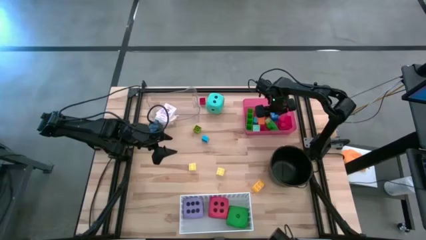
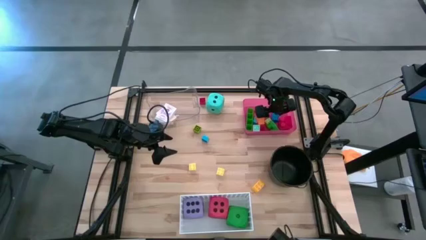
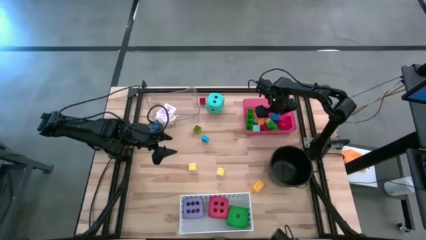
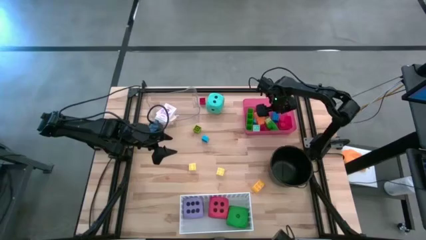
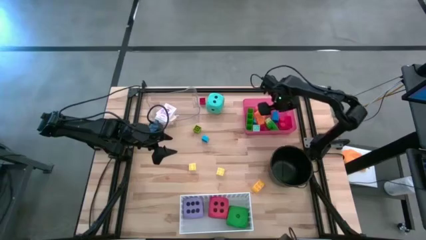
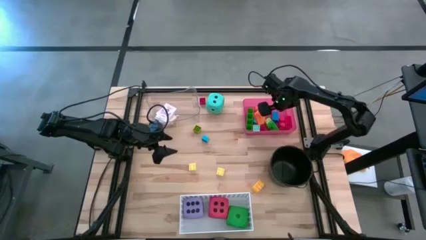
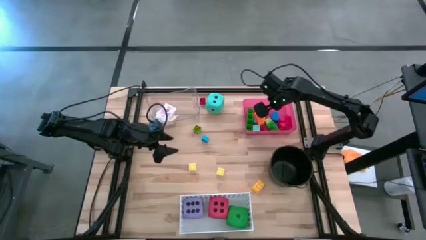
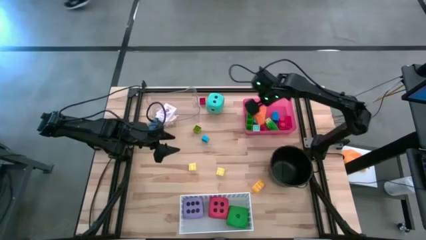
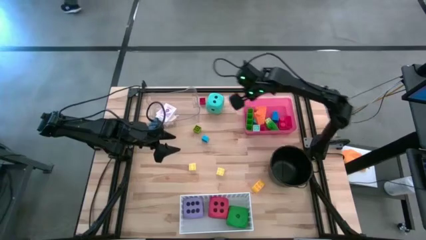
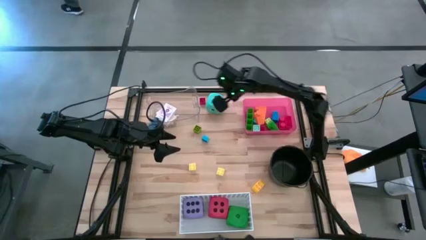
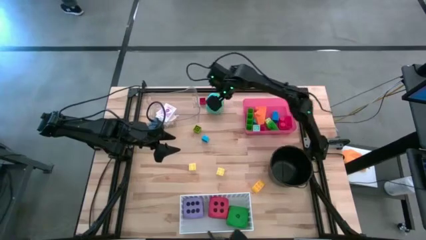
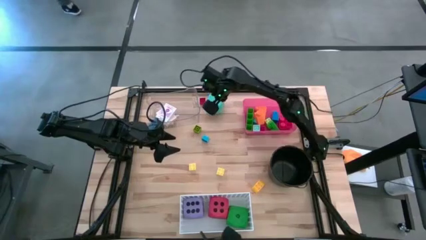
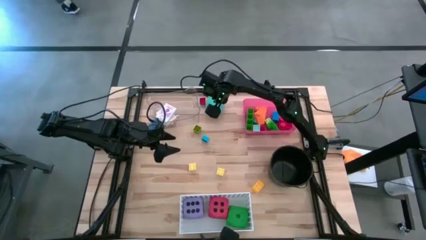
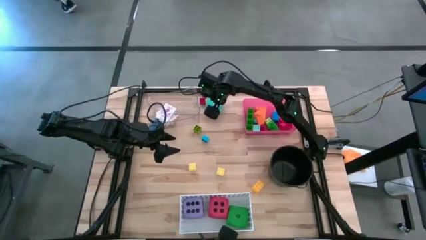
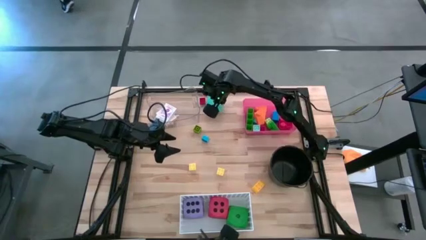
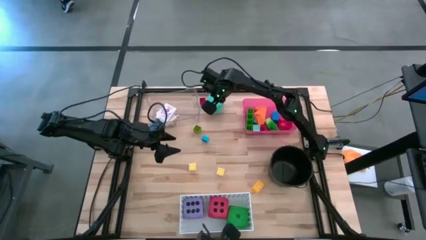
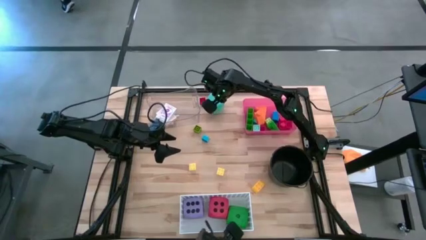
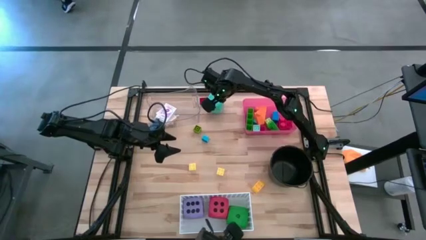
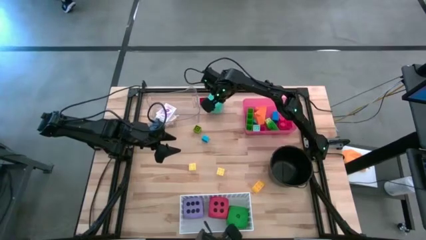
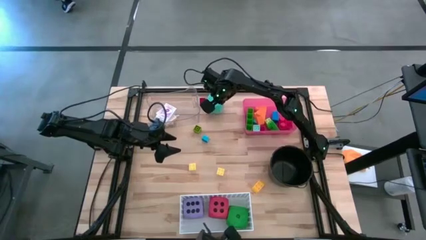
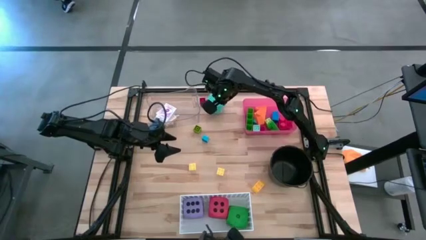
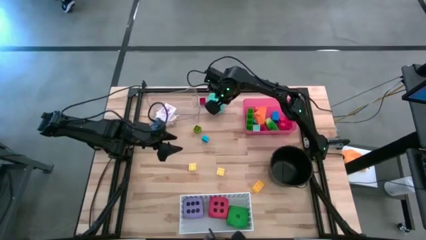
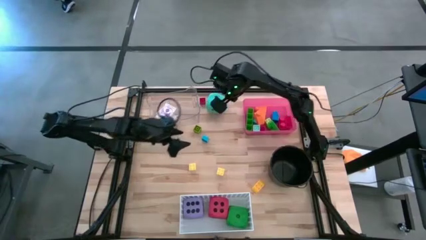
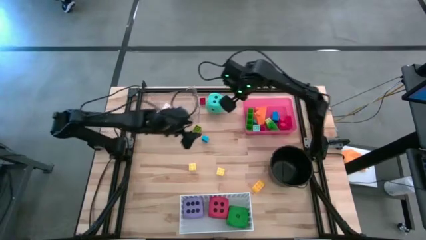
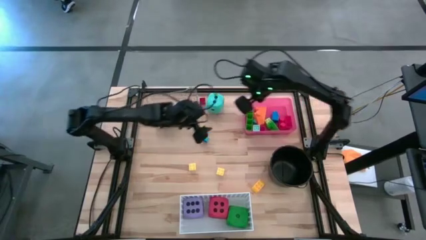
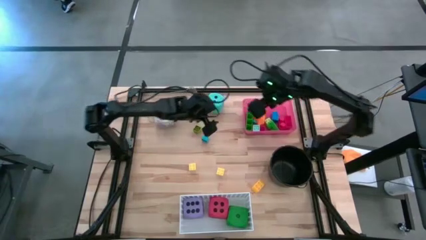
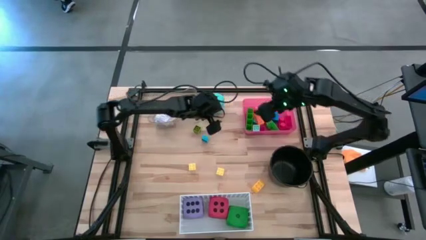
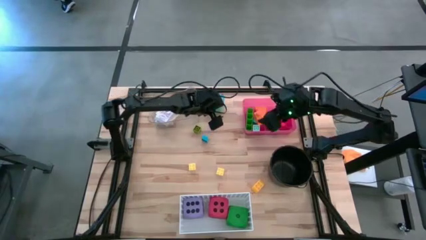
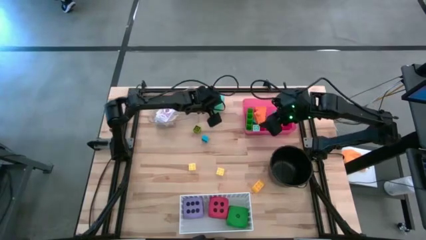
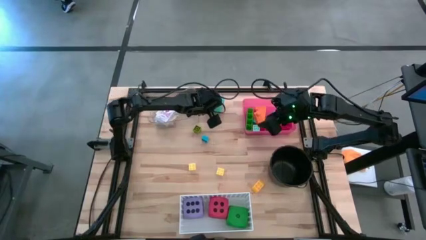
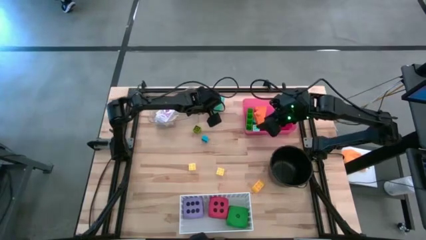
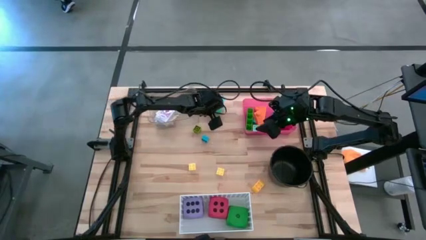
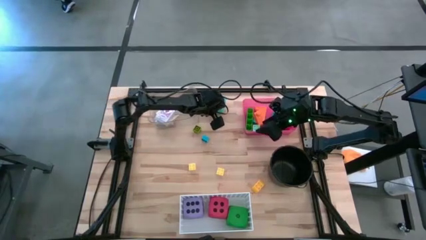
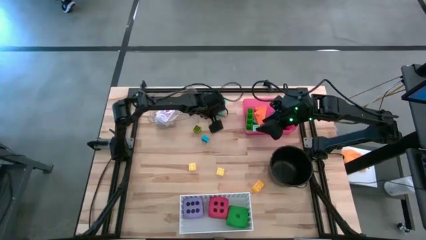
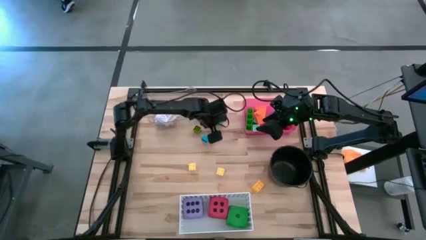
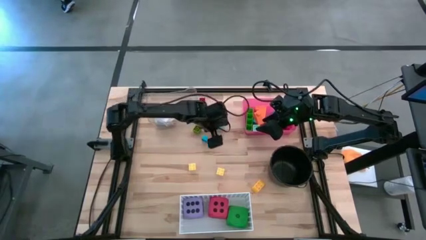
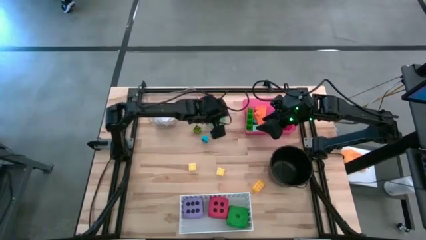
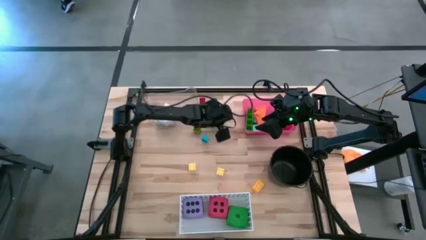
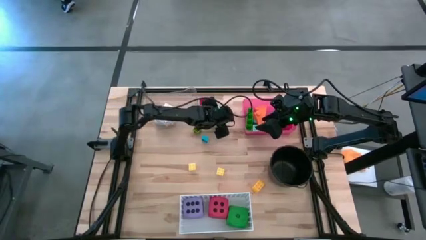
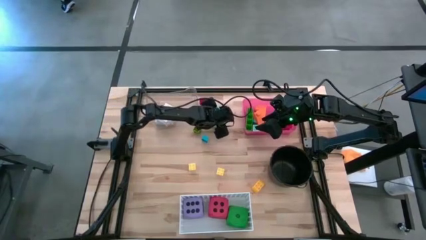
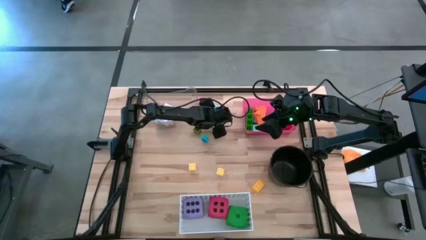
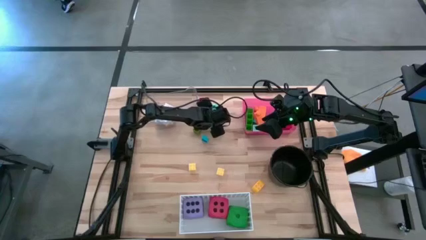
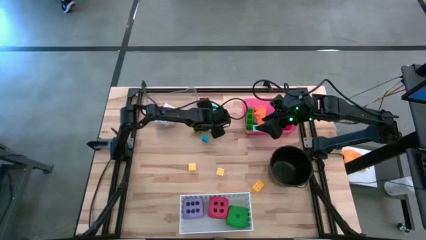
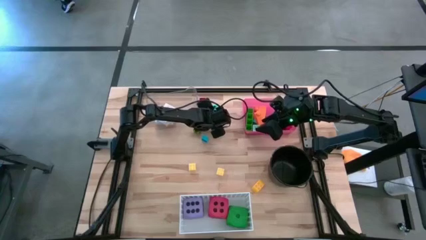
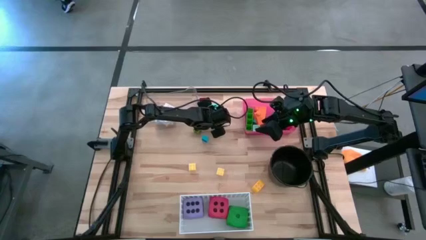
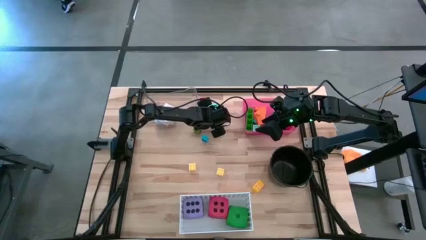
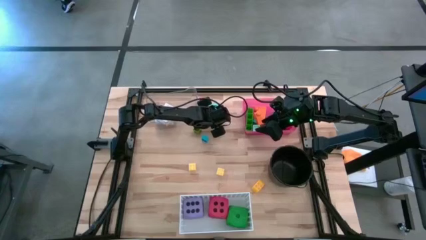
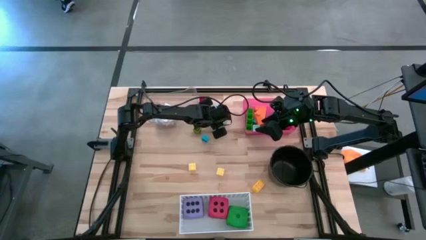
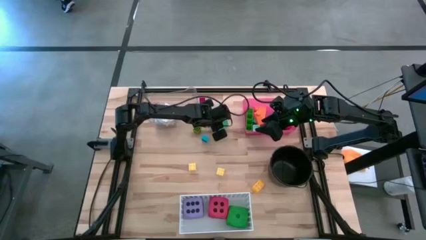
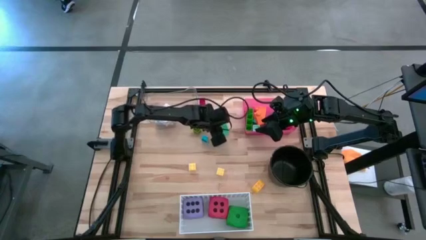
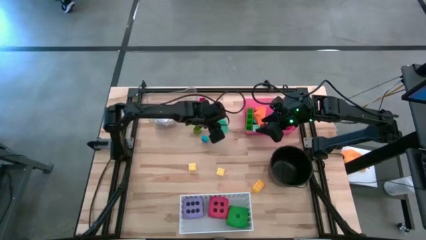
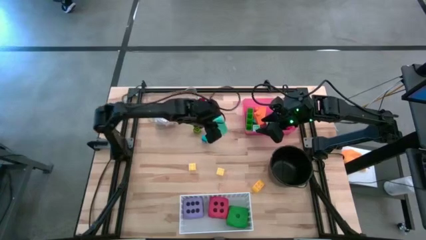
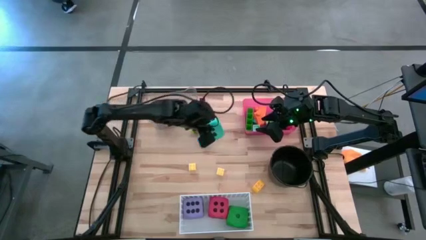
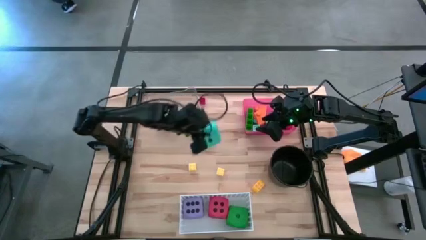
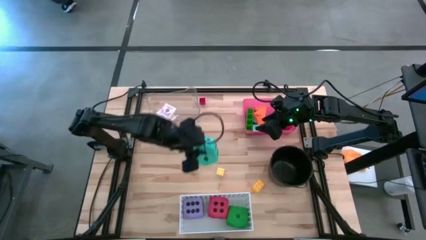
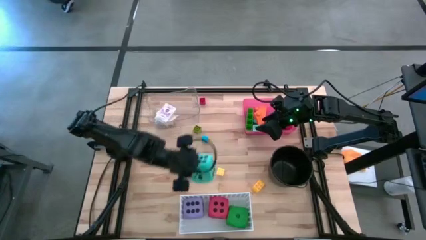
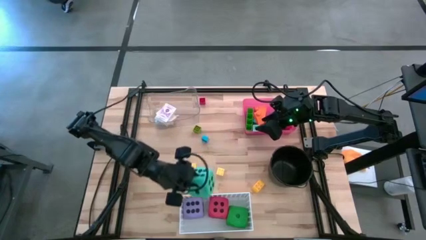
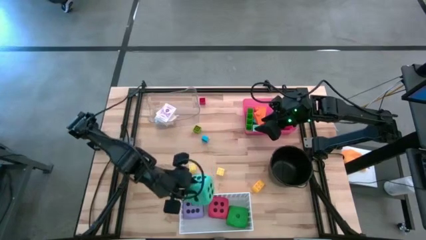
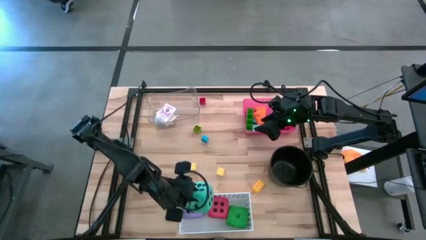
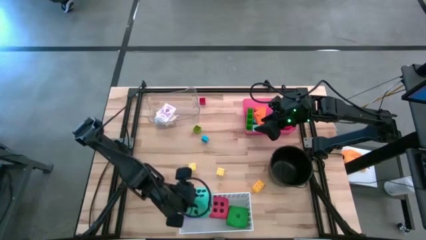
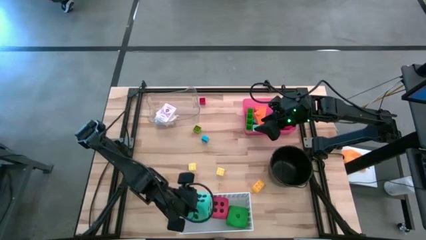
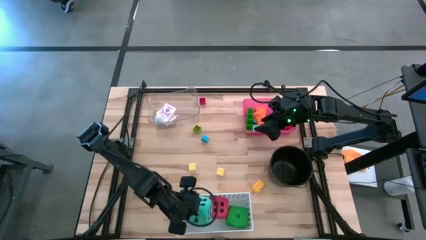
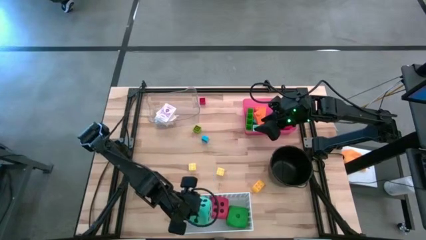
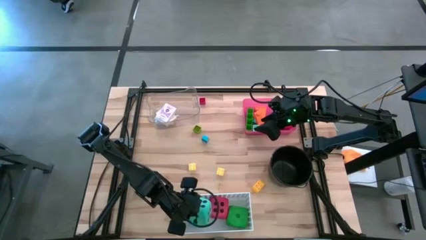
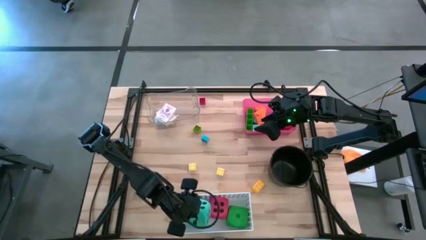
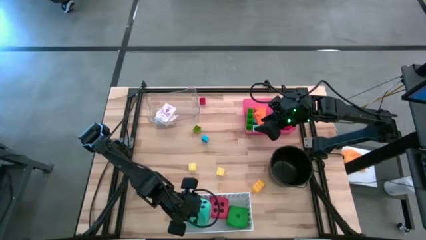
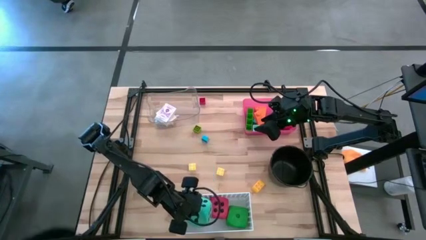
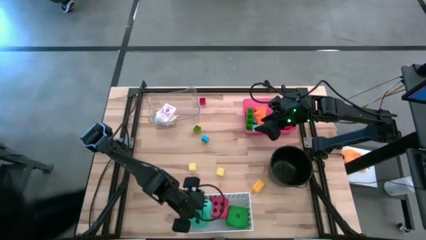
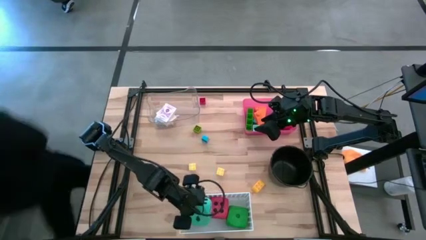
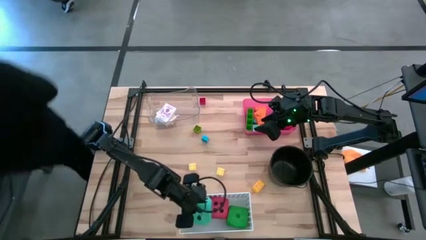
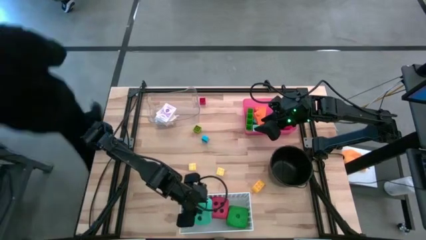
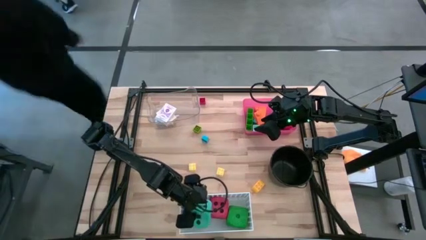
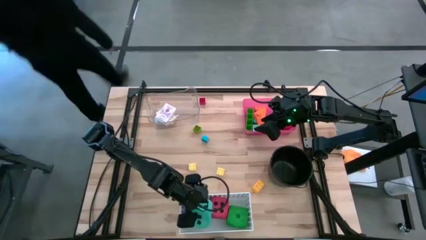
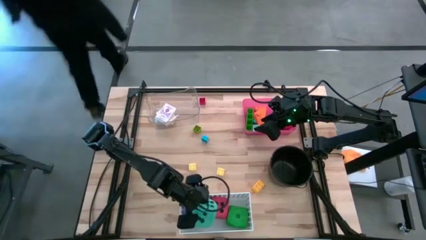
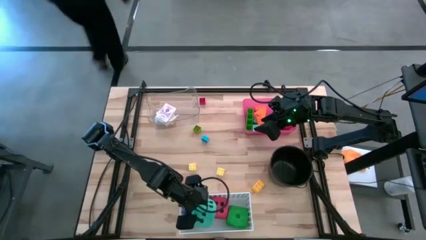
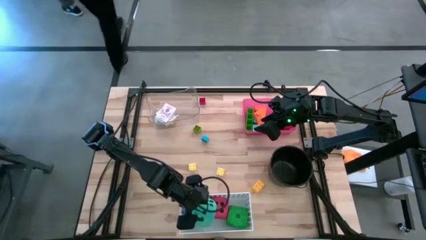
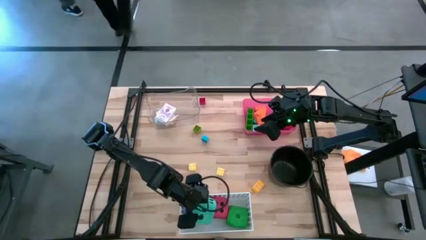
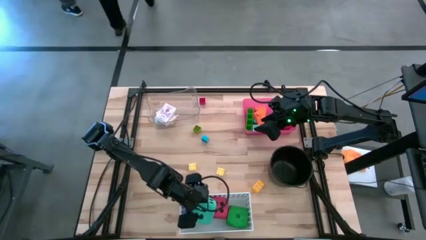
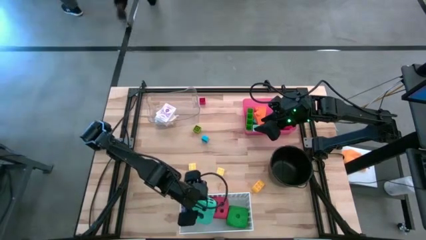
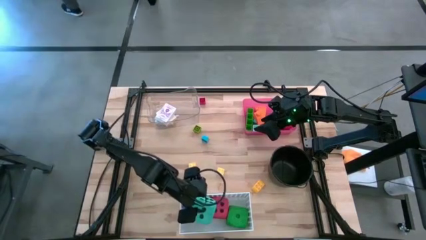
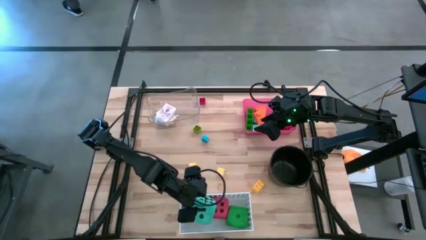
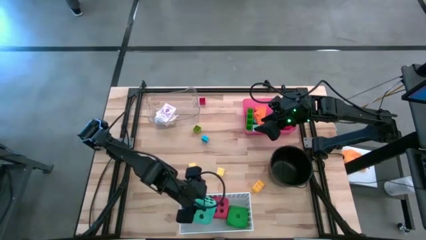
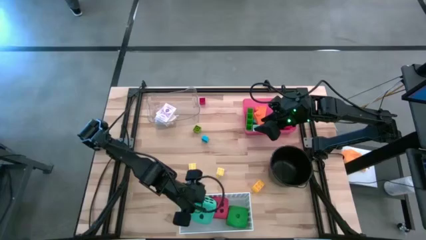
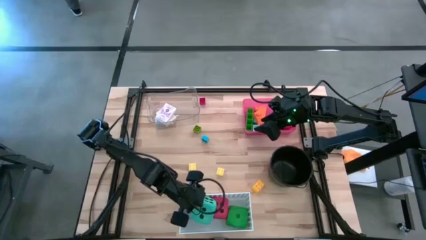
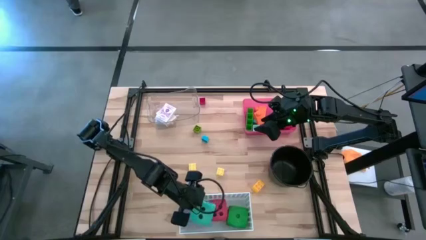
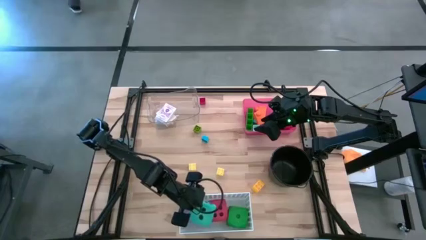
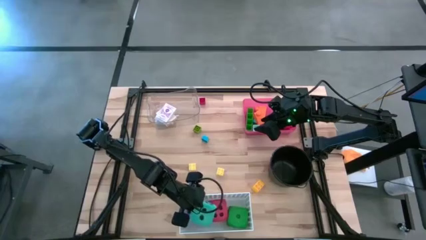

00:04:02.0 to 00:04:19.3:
Task: Pick & Place Toys
Put the blue dice into the white bin
